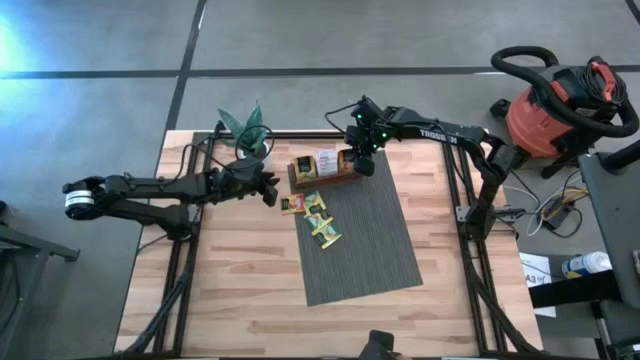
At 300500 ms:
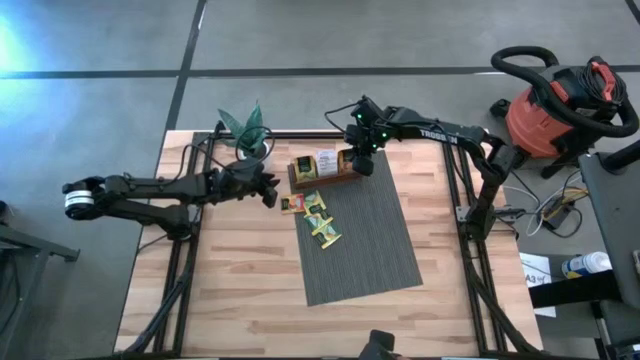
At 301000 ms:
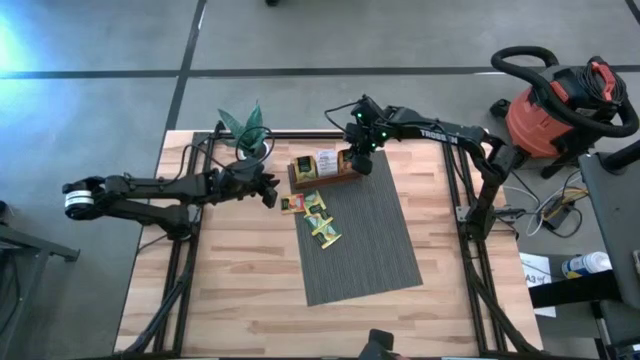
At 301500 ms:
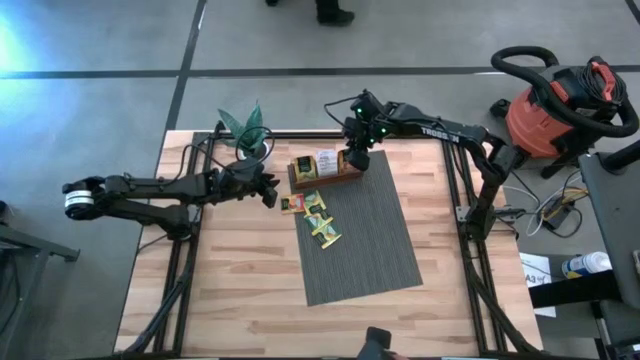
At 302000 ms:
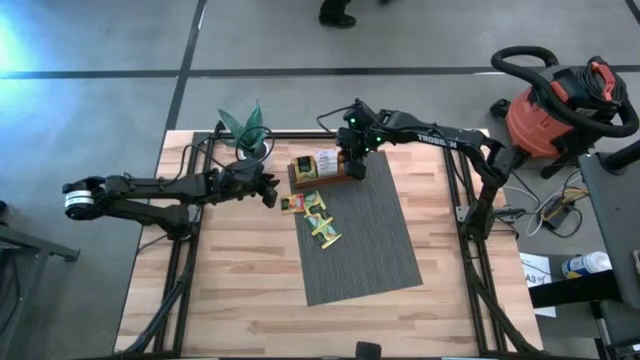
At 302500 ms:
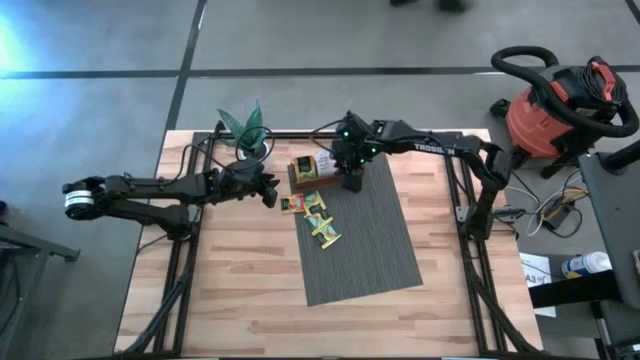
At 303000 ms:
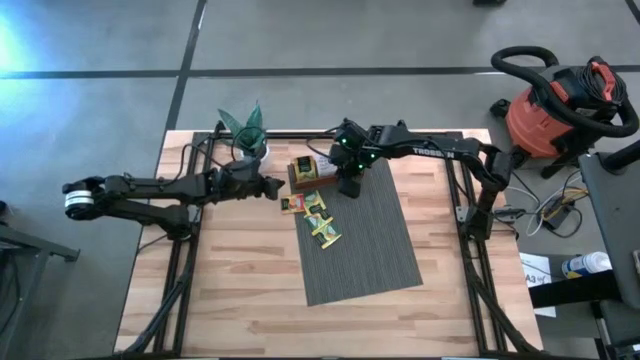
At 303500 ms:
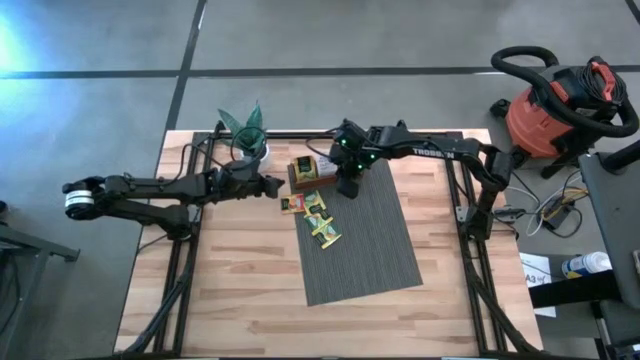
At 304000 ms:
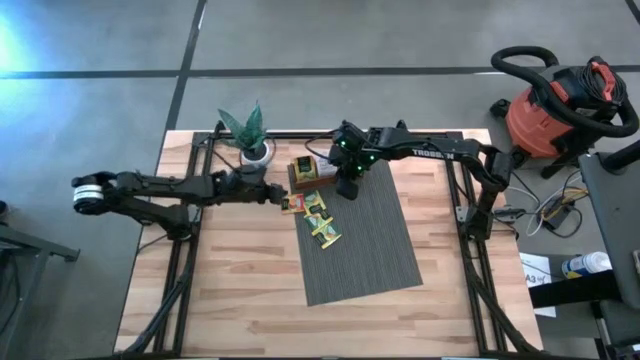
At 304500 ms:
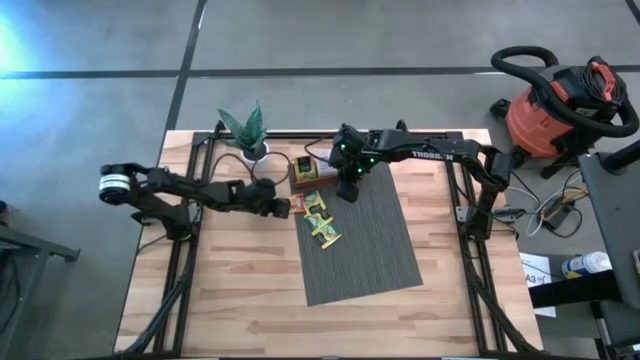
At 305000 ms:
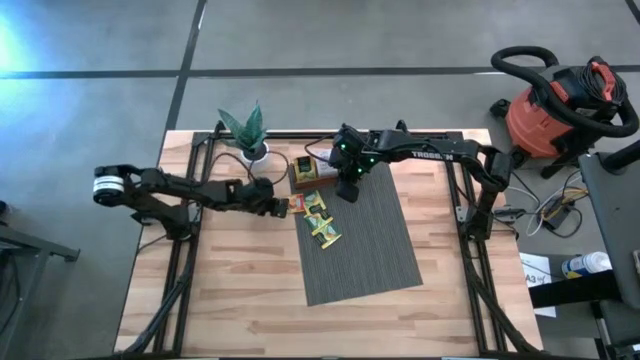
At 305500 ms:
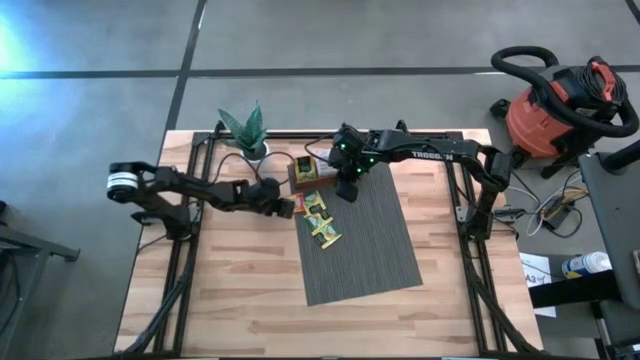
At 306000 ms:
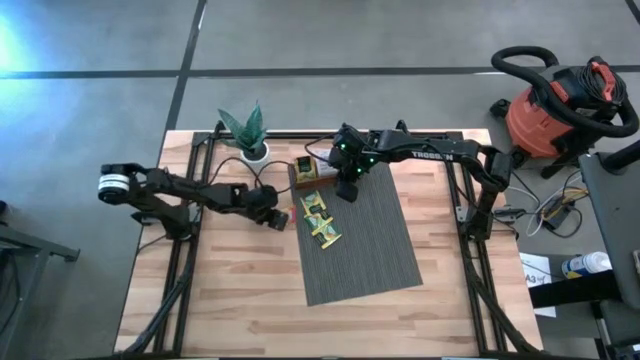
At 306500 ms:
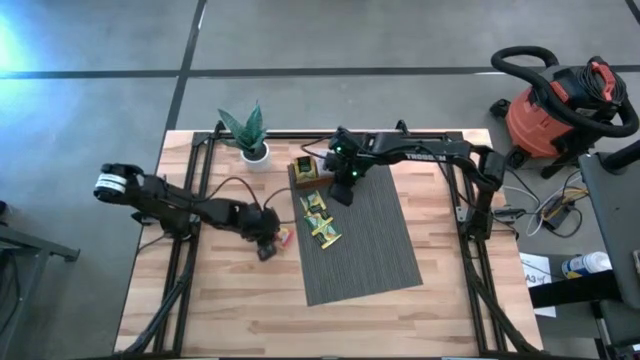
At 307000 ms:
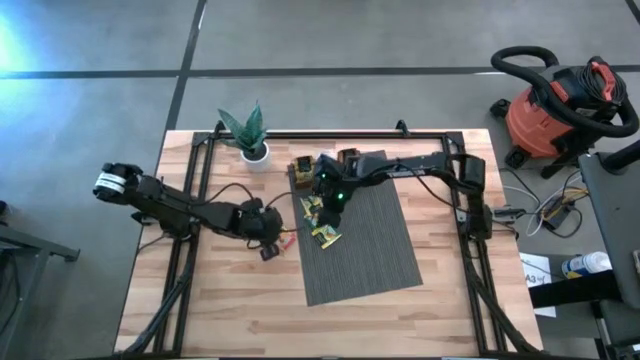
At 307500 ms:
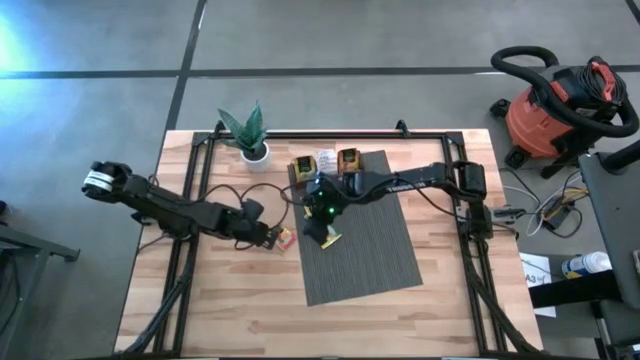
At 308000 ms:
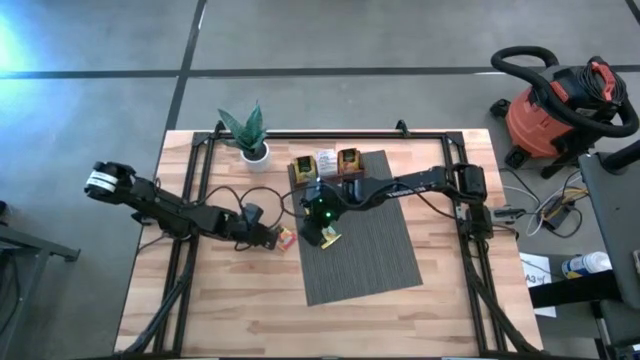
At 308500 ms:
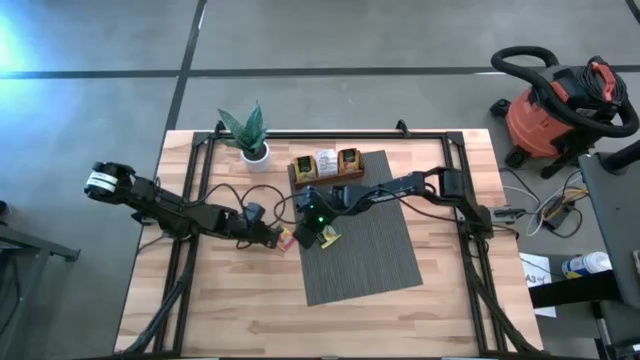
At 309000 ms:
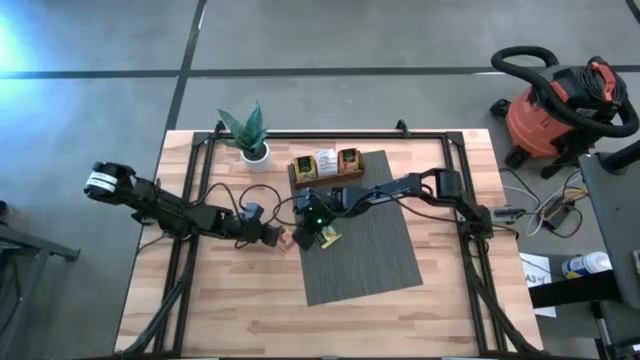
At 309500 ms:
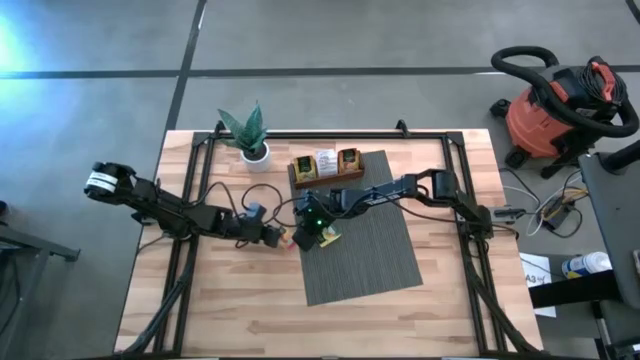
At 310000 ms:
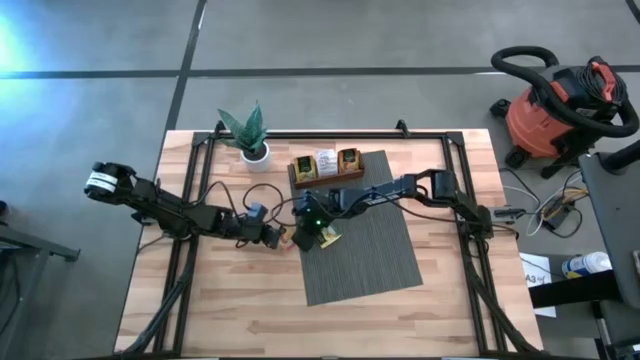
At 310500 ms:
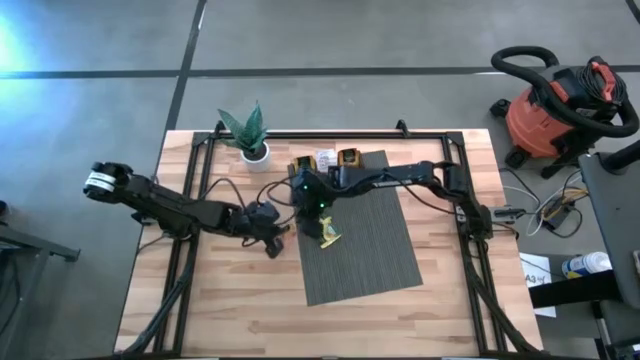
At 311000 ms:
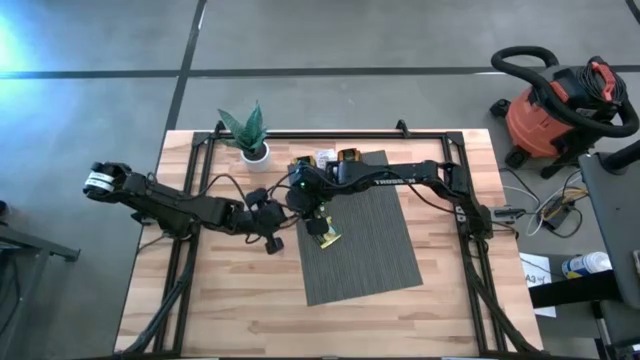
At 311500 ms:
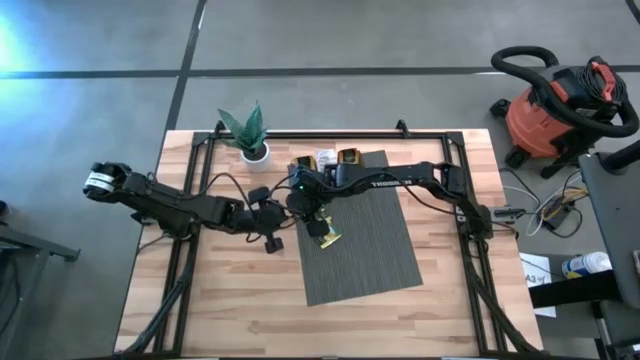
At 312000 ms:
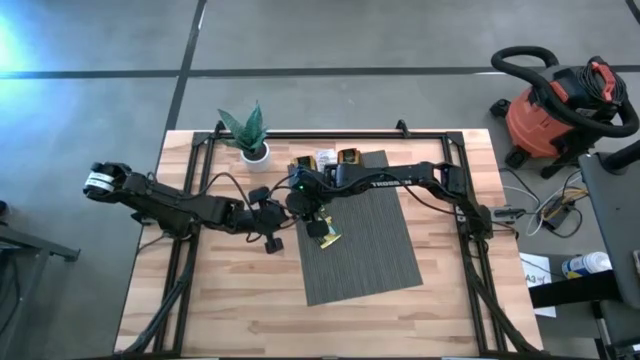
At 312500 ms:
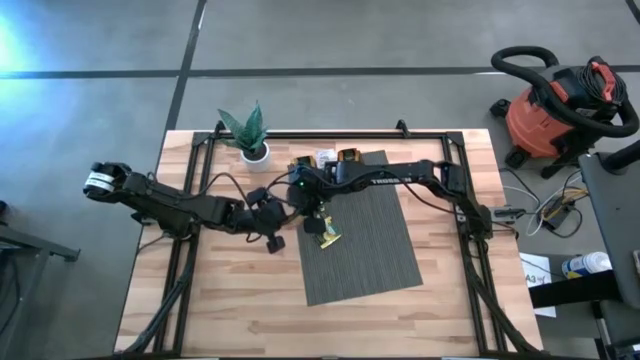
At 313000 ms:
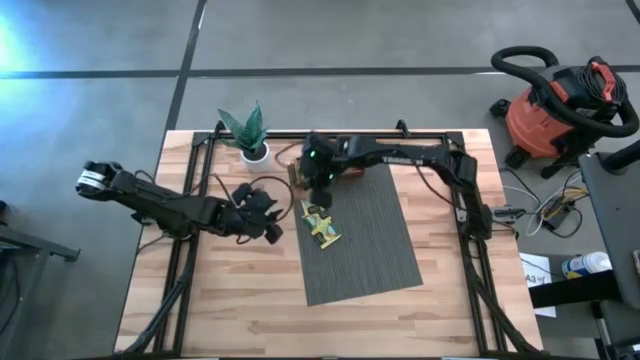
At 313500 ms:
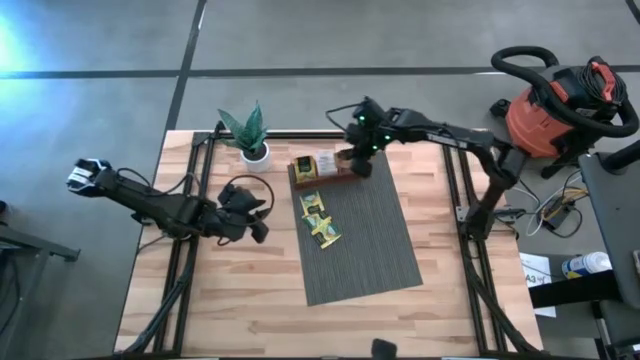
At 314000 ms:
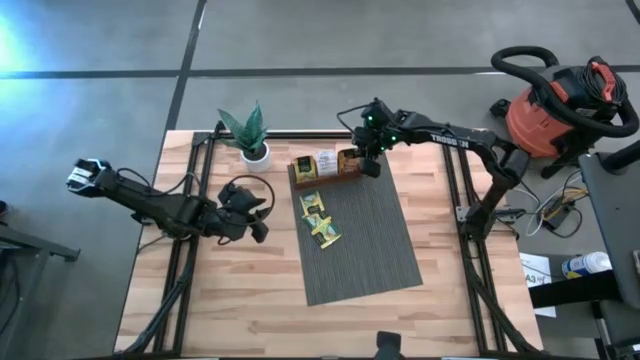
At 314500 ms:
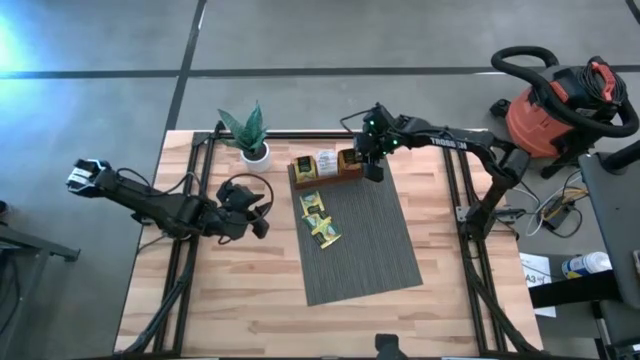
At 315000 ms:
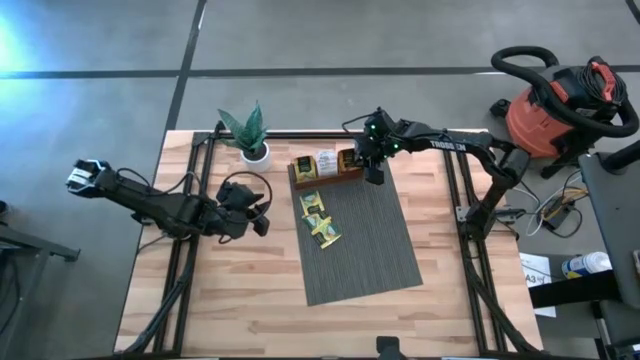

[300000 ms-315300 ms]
Task: Pick & Place Tea
Put the orange tea bag into the right compartment of the wooden organizer

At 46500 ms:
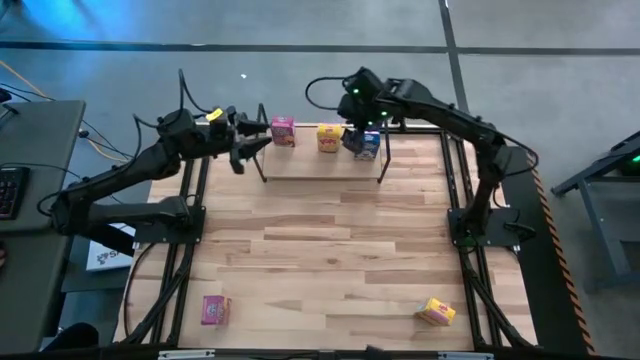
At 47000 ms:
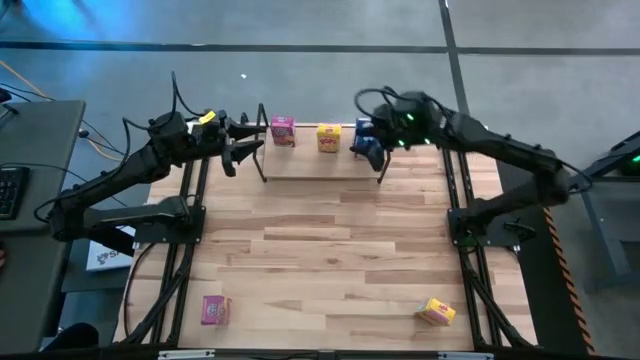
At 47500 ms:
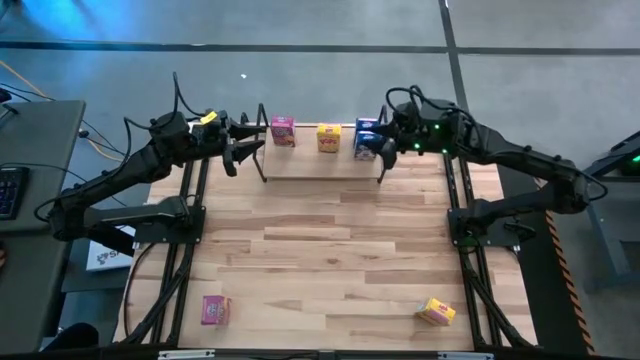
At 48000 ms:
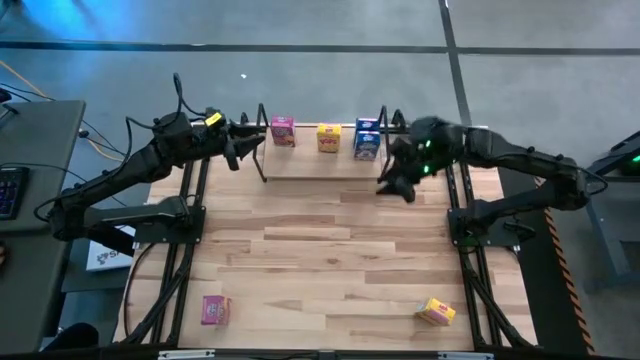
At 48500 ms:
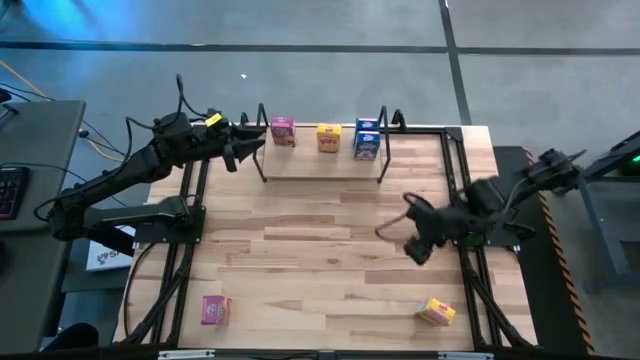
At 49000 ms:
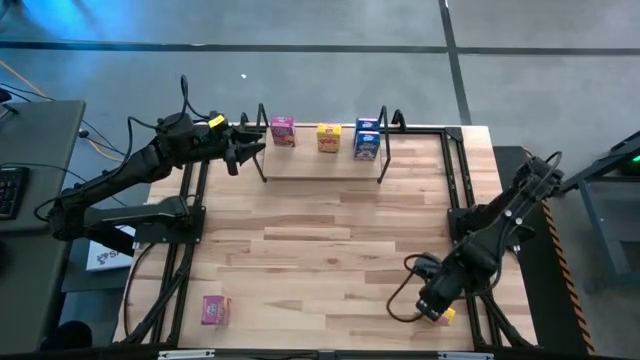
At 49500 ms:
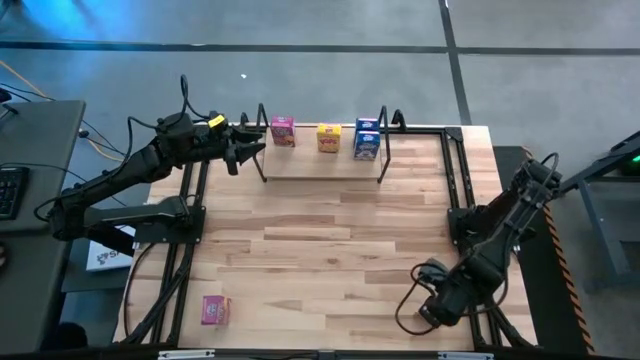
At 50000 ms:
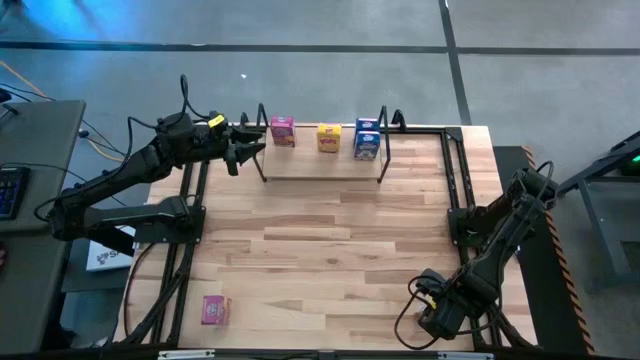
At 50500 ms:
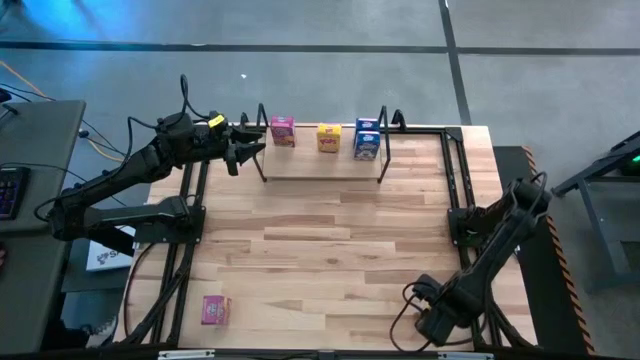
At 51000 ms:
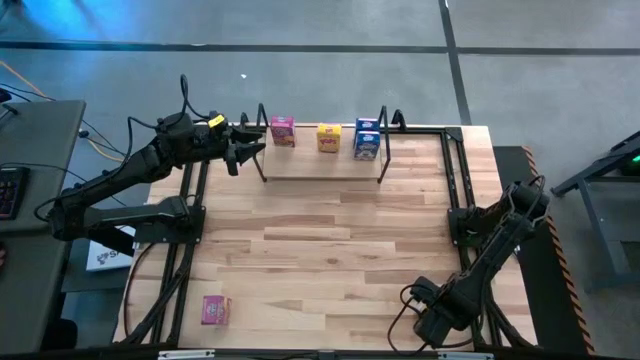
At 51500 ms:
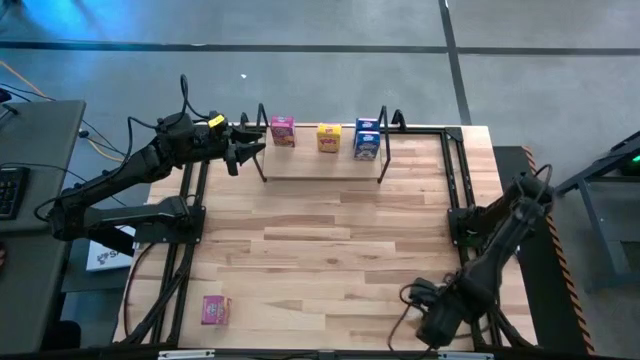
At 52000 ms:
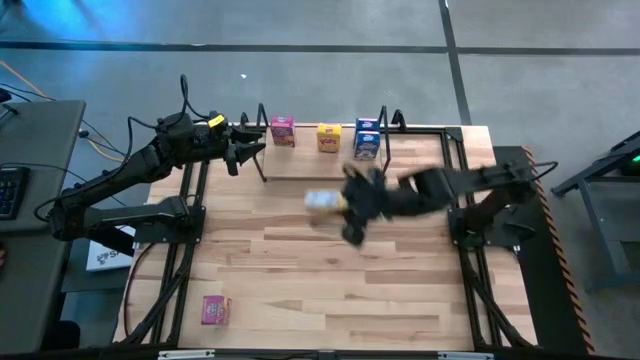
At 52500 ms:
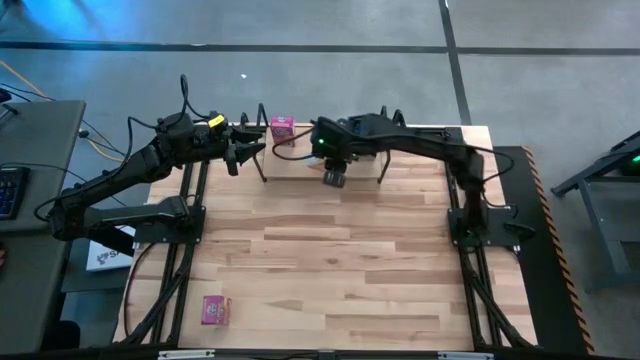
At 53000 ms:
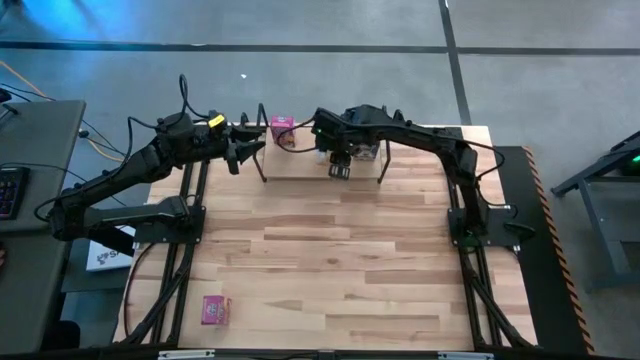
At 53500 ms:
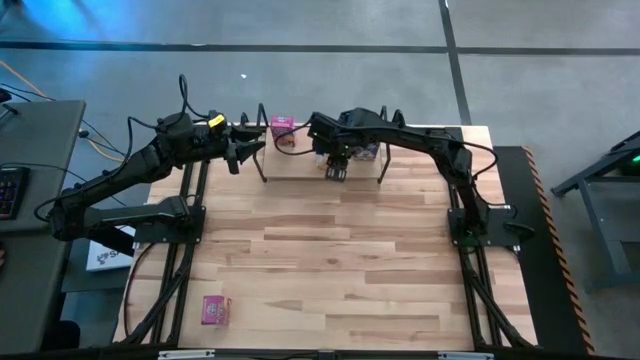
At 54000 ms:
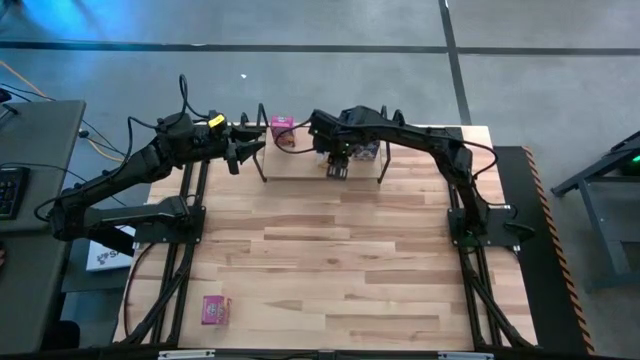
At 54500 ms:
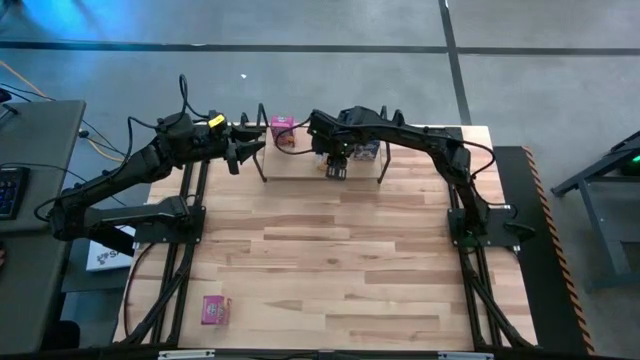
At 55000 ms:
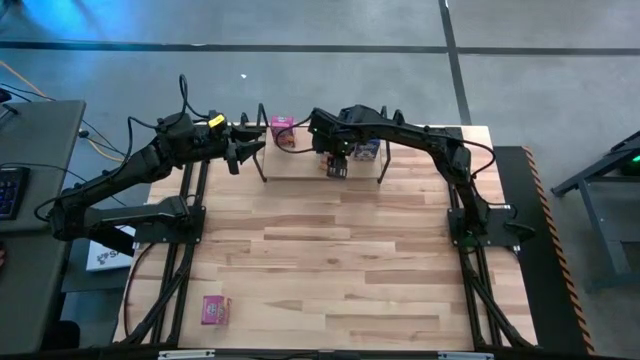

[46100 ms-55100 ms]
Task: Stack cereal on shelf
Put the yellow cereal box aligned with the other yellow cereal box on the shelf
